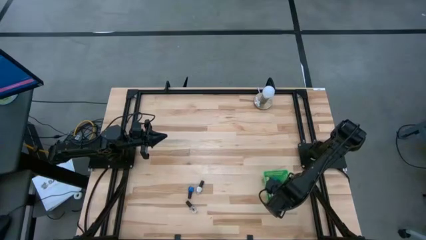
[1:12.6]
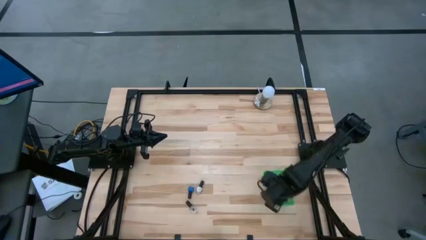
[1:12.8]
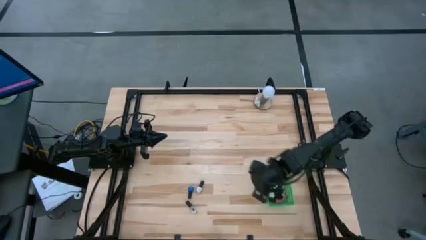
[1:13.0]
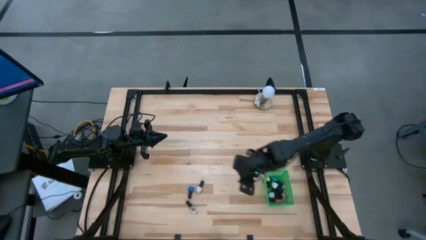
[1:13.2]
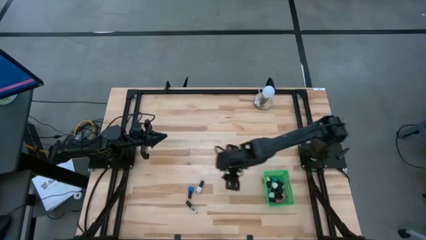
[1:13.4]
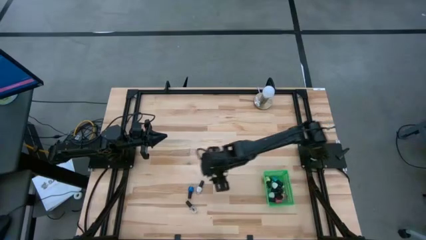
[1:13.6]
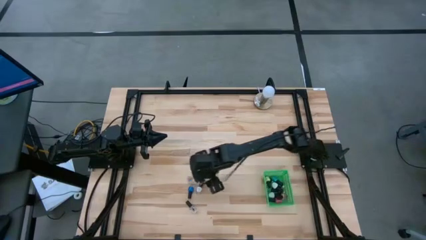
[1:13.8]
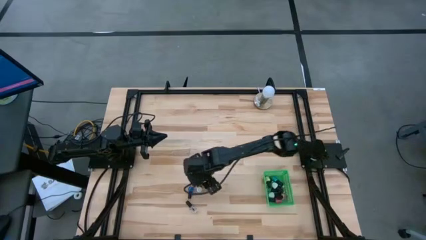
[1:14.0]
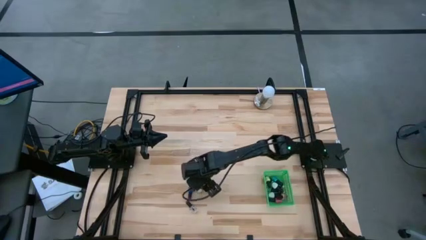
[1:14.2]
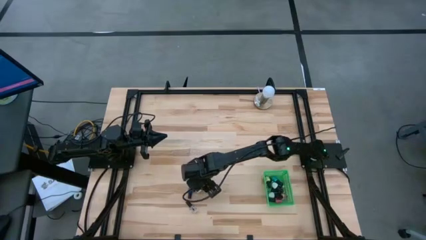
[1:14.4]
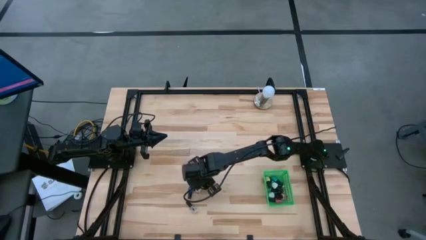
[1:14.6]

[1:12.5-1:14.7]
Task: Pick & Place Nail Polish
Put the white nail polish into the green bin

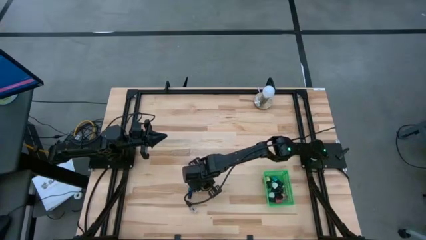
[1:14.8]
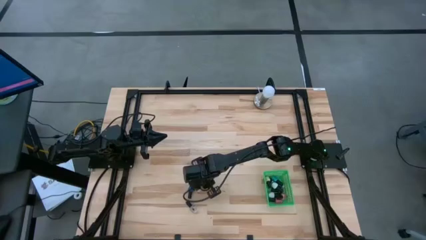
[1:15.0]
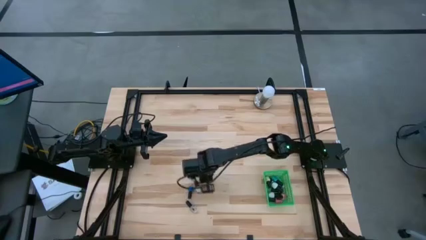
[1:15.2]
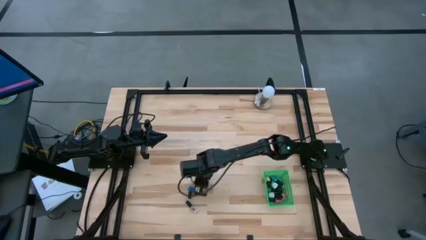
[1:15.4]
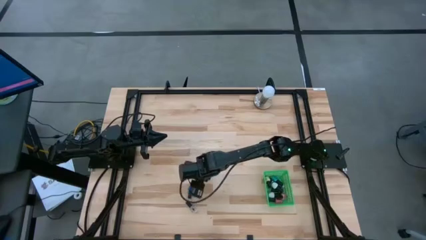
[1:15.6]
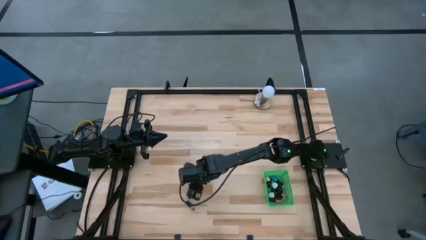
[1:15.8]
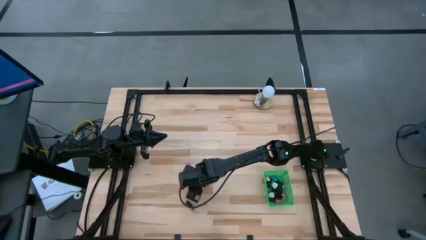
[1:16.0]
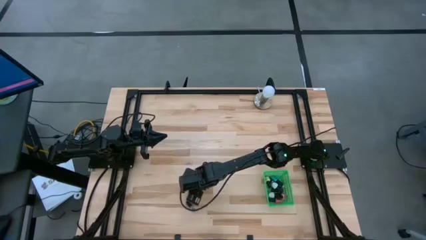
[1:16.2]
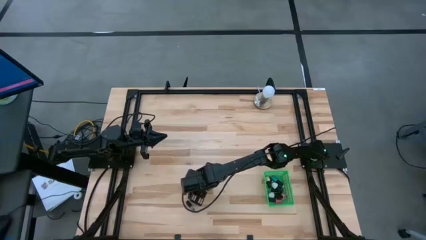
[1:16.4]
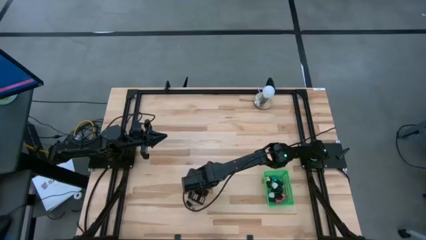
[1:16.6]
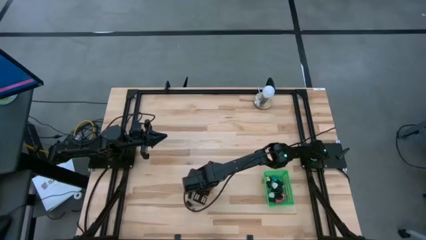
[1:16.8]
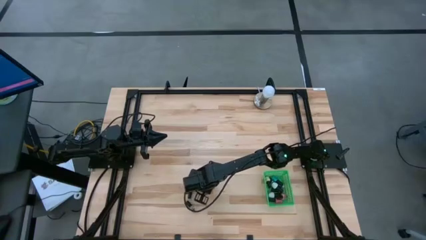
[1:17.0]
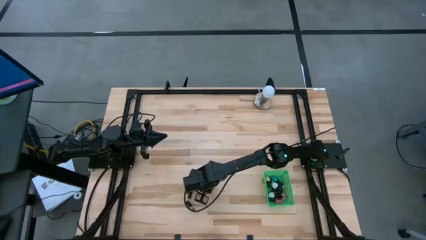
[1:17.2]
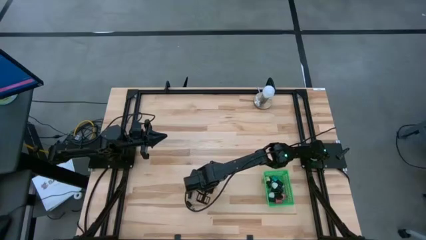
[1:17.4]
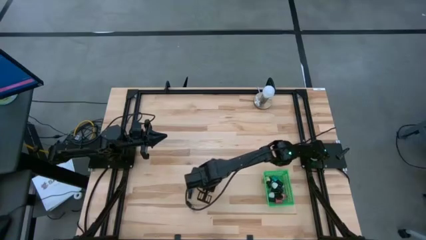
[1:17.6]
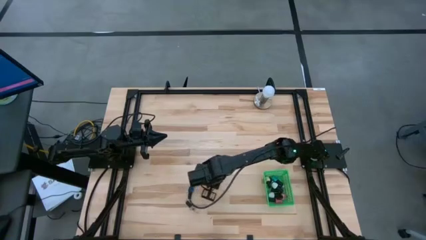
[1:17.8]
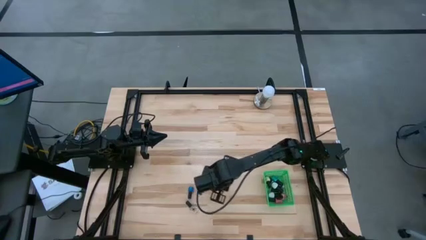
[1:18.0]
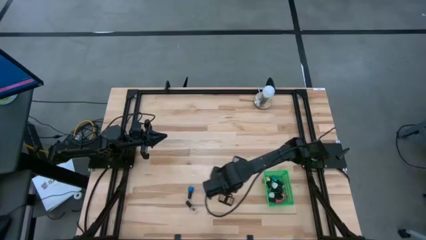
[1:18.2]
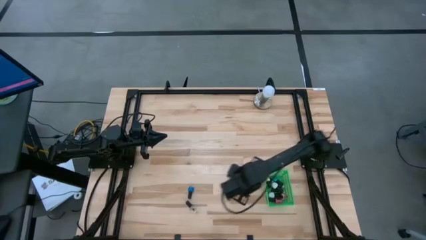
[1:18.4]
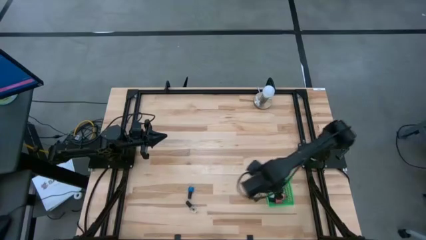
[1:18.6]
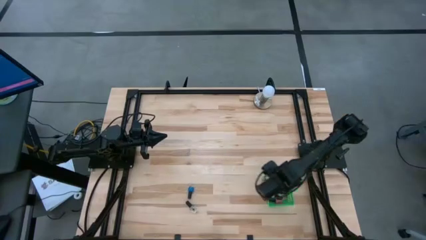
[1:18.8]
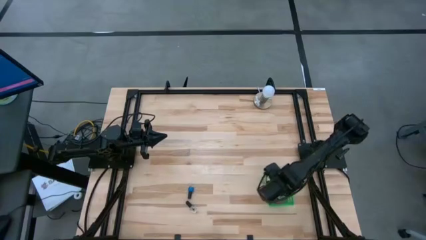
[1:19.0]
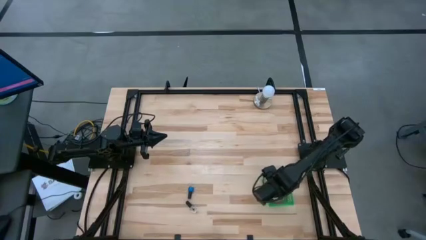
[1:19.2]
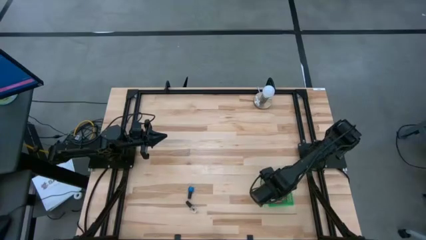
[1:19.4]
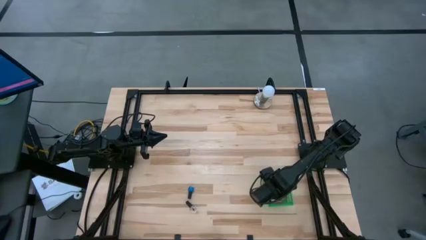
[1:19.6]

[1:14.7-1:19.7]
Put the white nail polish into the green bin

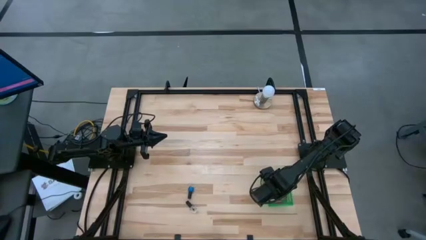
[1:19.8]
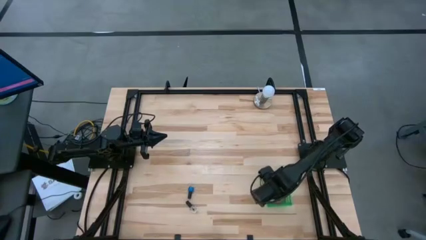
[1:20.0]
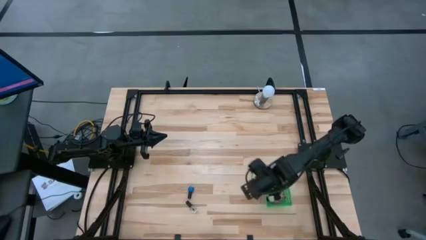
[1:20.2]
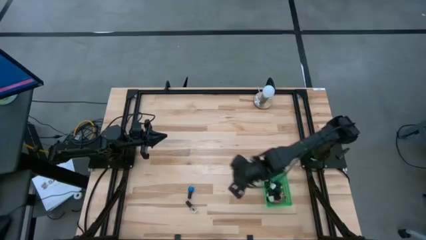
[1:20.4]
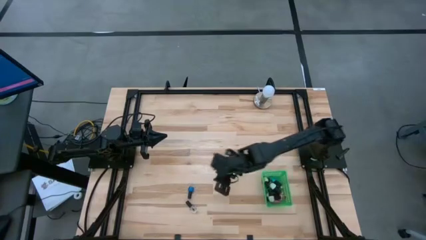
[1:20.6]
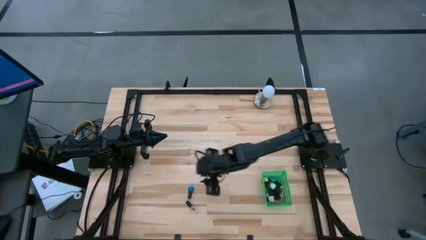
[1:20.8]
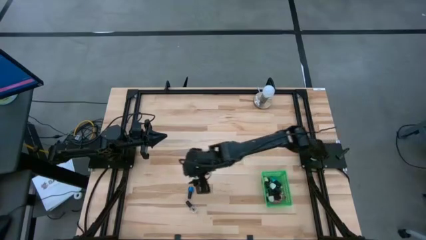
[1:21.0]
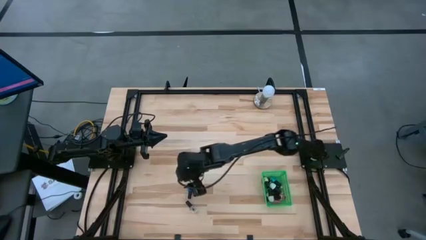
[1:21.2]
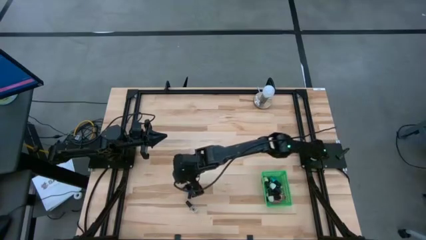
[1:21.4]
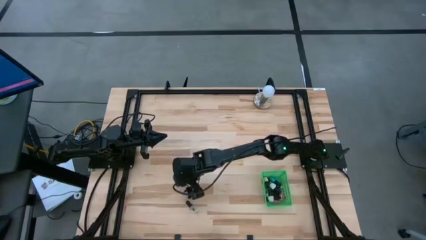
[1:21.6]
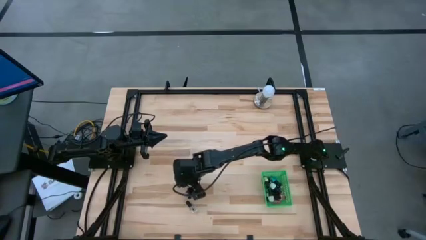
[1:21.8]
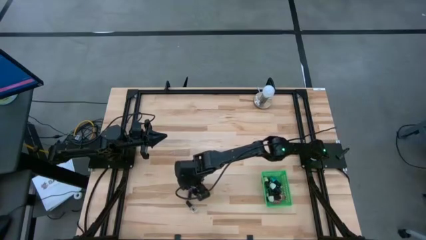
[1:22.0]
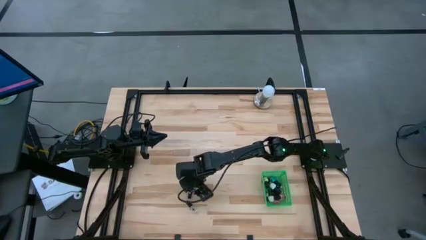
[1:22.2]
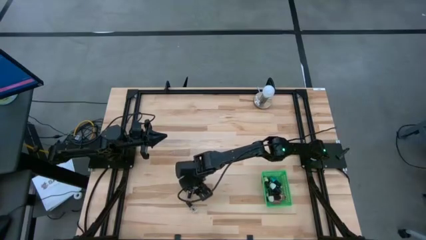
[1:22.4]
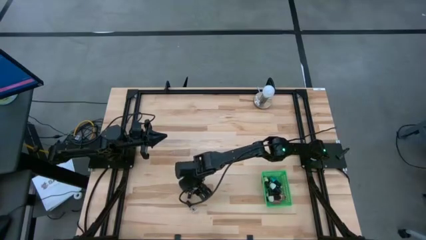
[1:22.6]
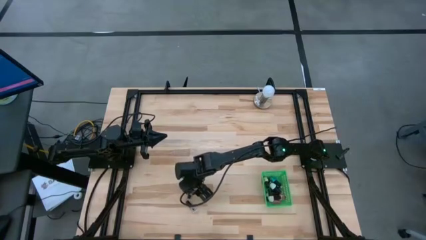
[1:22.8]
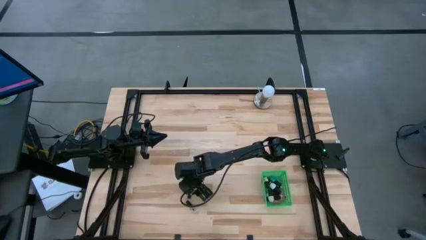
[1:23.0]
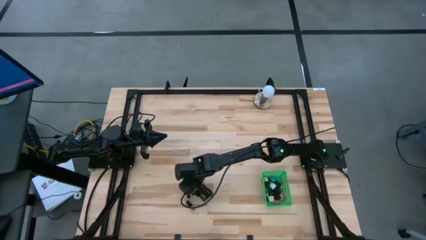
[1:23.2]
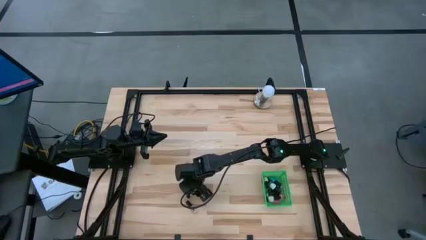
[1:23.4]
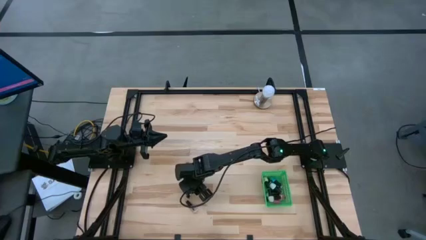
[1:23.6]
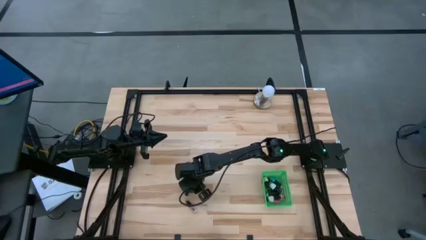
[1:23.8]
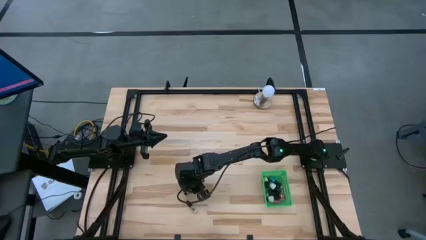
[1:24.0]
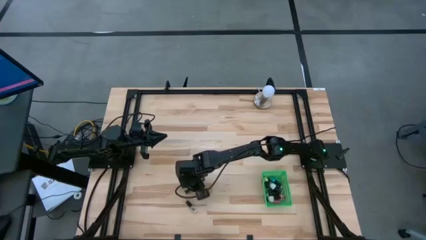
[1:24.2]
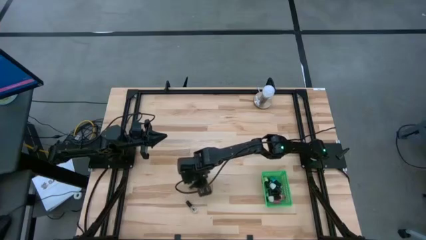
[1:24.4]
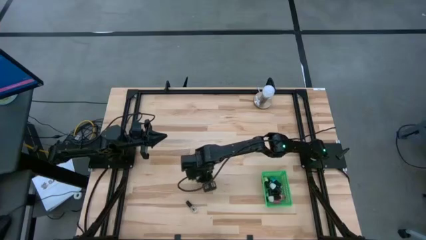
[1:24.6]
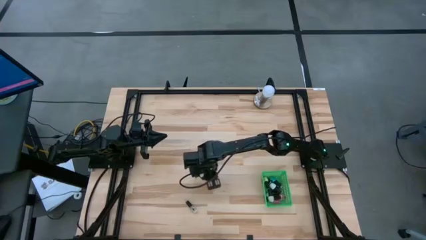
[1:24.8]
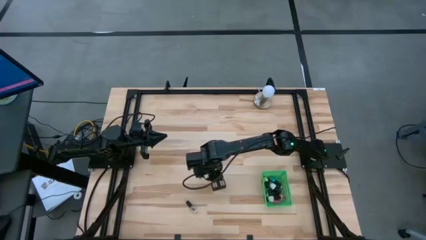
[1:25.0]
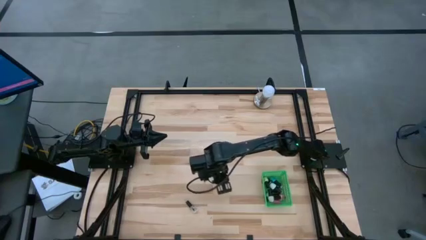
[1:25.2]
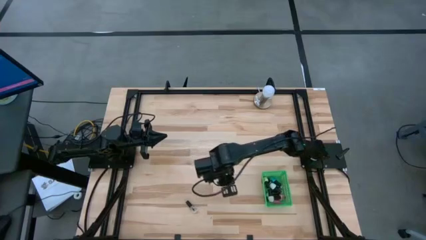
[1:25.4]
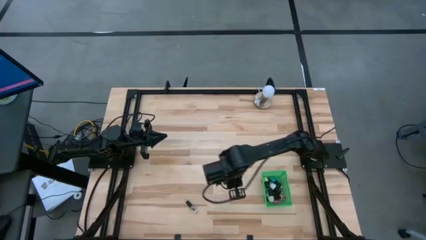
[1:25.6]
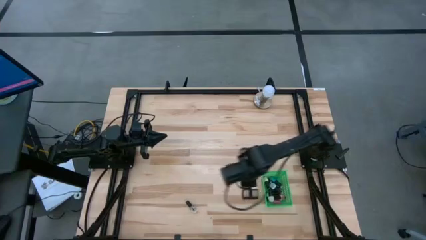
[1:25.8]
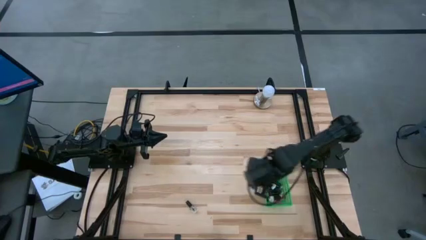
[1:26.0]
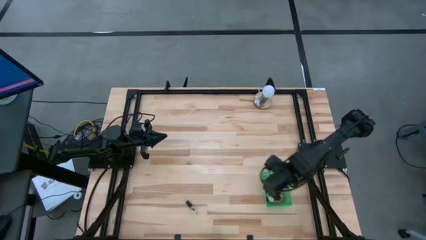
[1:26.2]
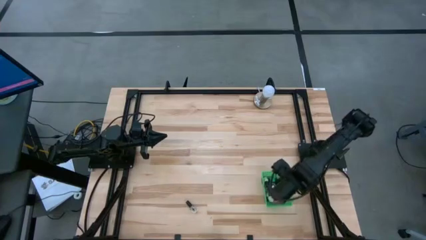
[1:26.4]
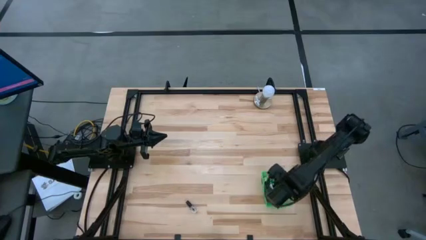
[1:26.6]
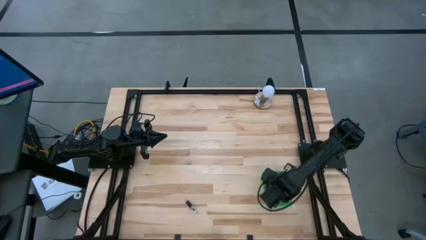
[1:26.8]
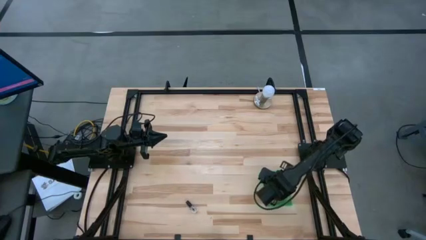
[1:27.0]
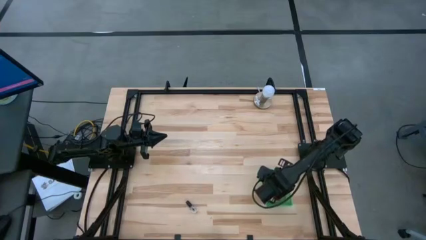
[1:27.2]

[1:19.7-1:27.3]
Put the blue nail polish into the green bin
